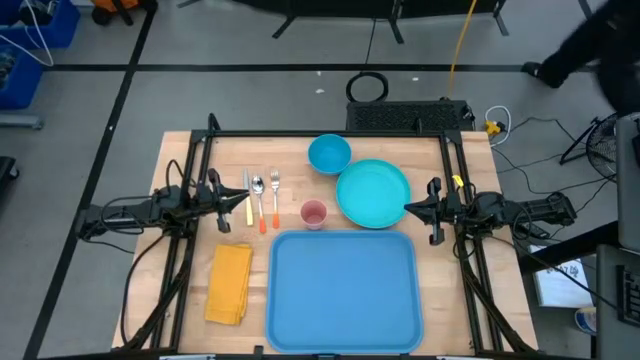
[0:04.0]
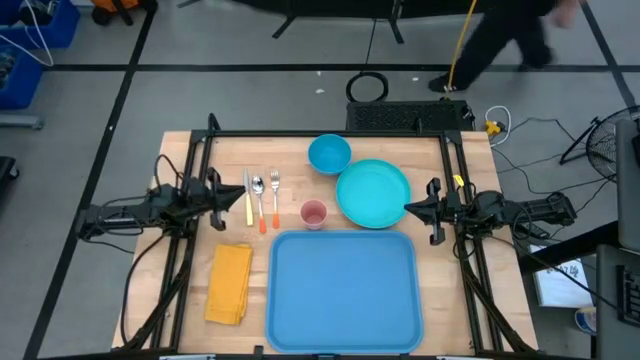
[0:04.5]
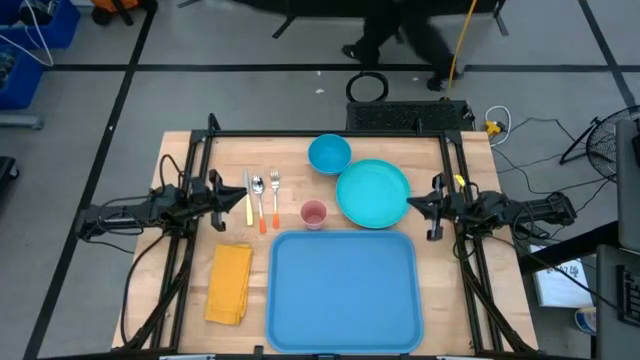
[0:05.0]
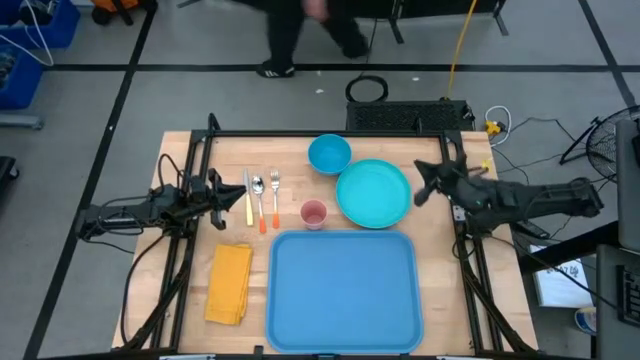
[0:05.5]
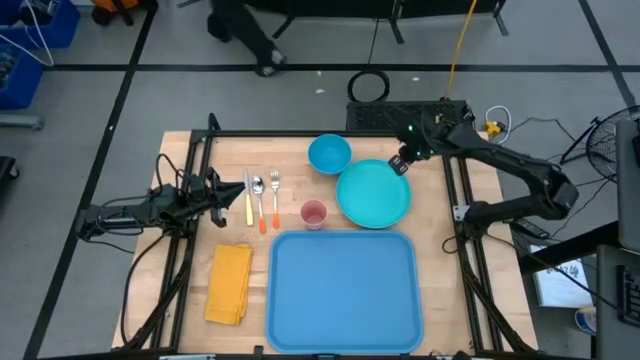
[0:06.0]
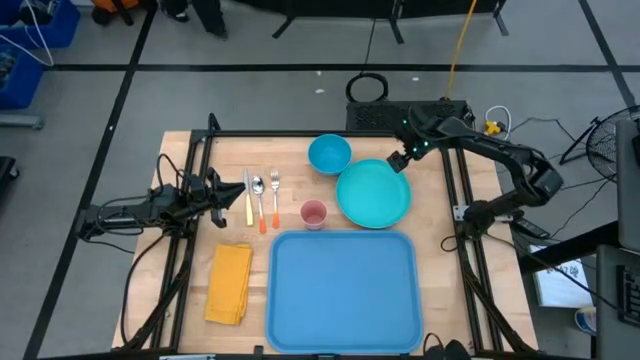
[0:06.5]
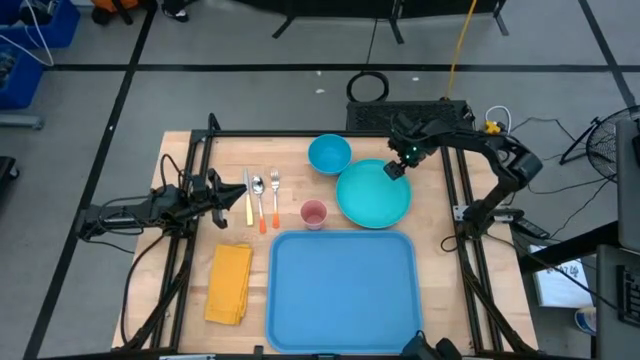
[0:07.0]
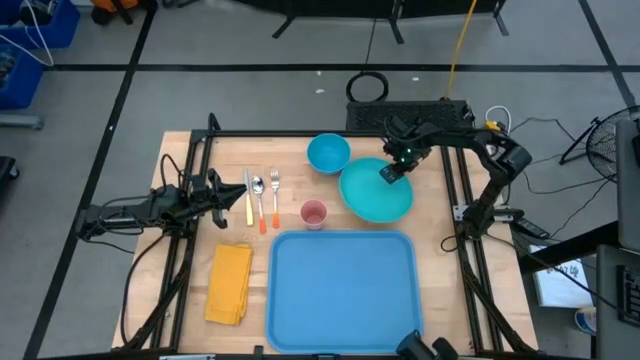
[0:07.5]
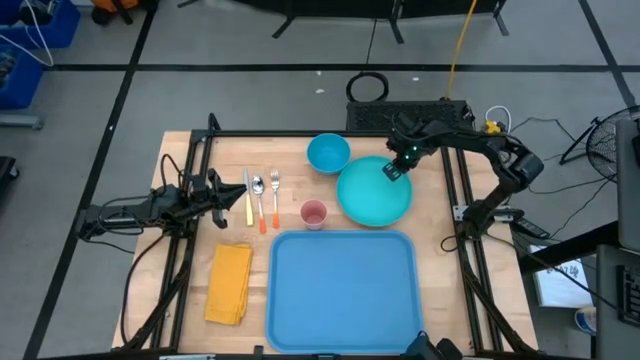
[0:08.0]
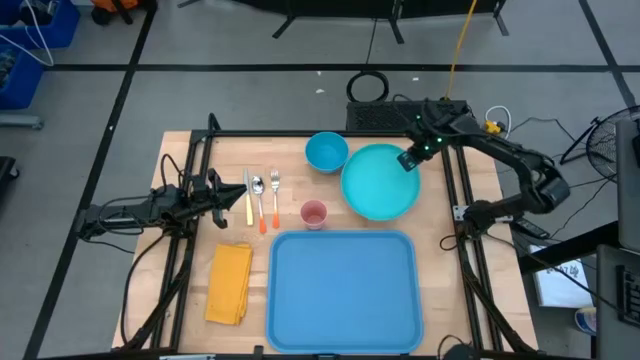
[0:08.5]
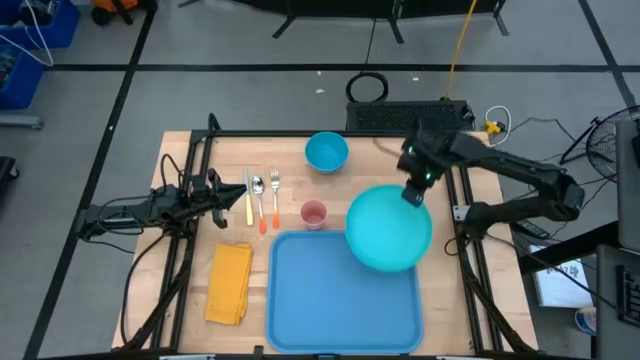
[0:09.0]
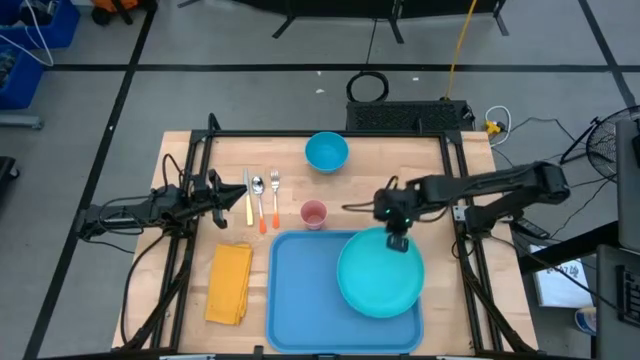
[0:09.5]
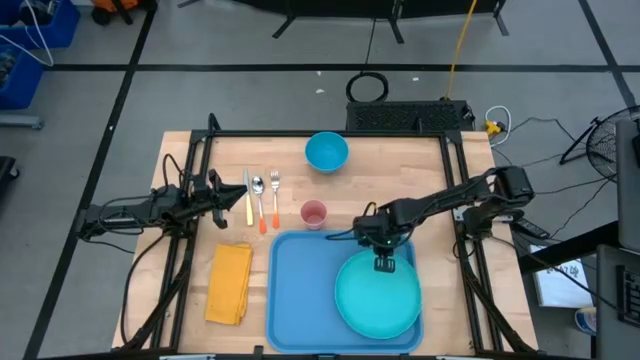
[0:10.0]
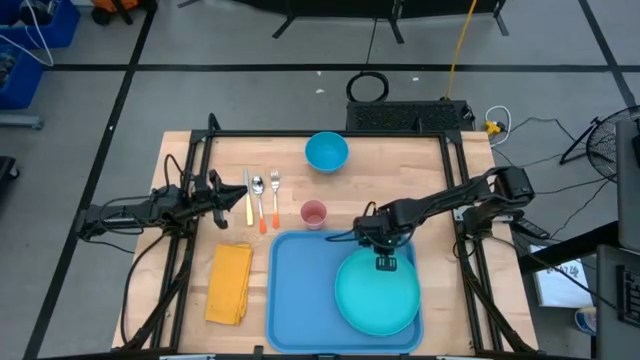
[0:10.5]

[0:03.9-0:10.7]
Task: Set up tray
Put the light blue plate on the right side of the blue tray

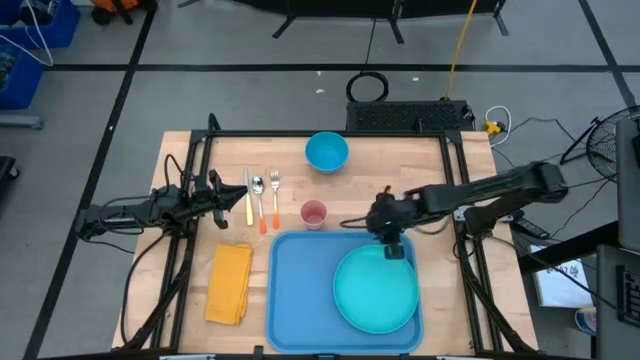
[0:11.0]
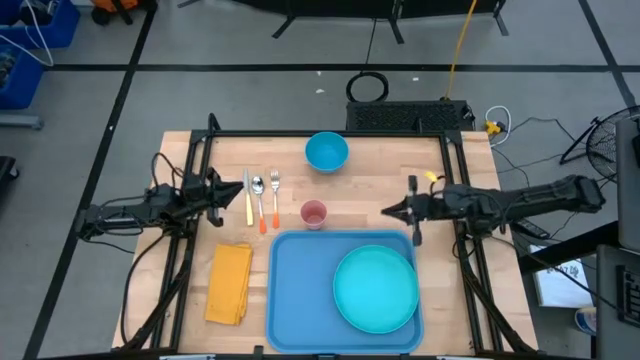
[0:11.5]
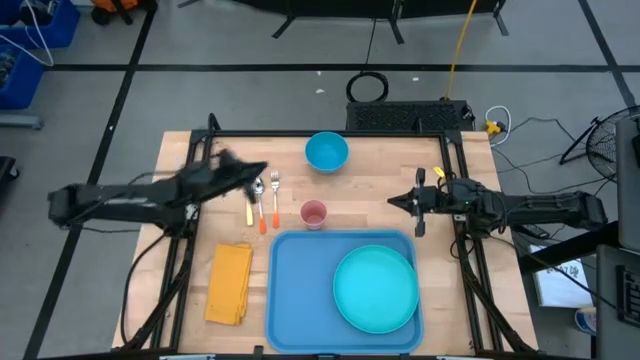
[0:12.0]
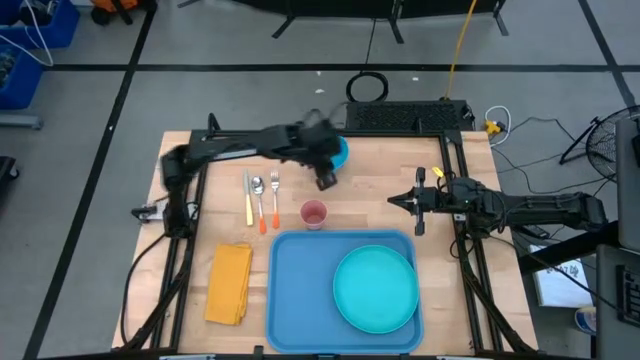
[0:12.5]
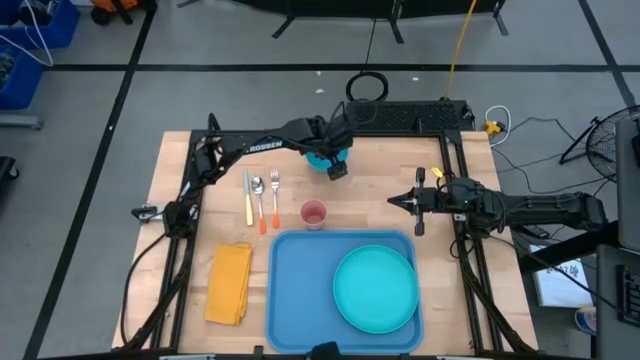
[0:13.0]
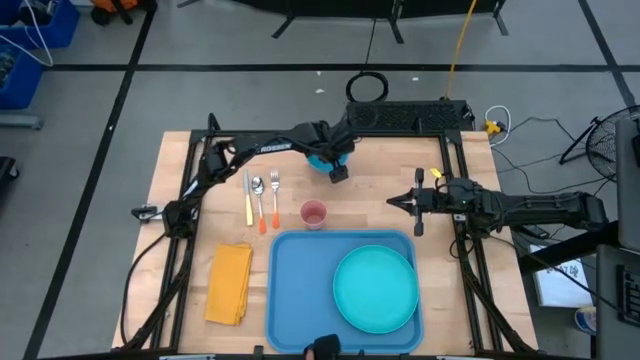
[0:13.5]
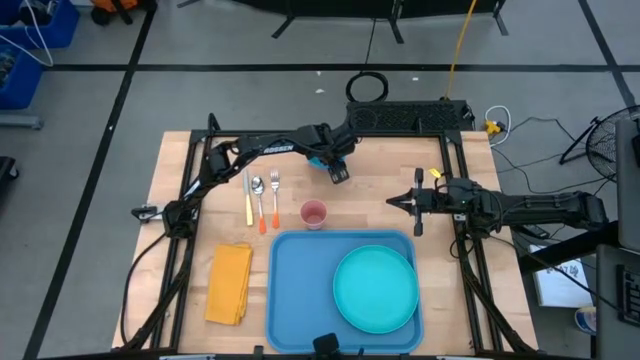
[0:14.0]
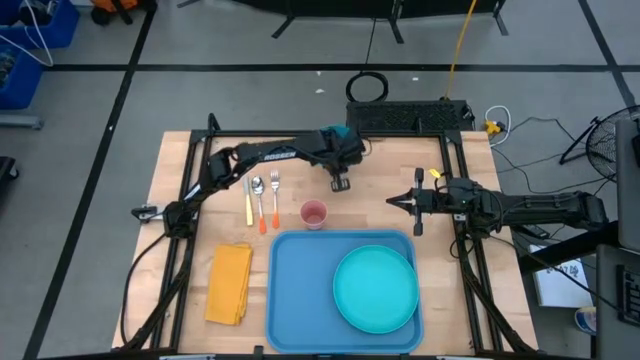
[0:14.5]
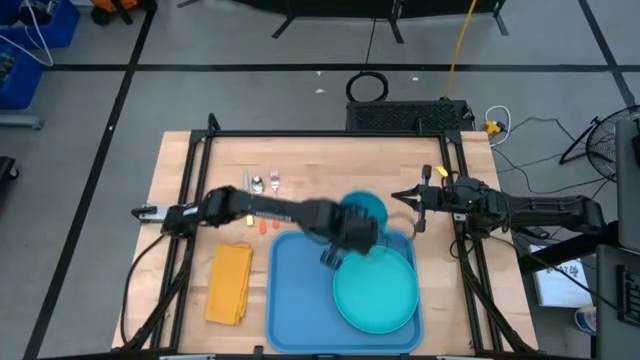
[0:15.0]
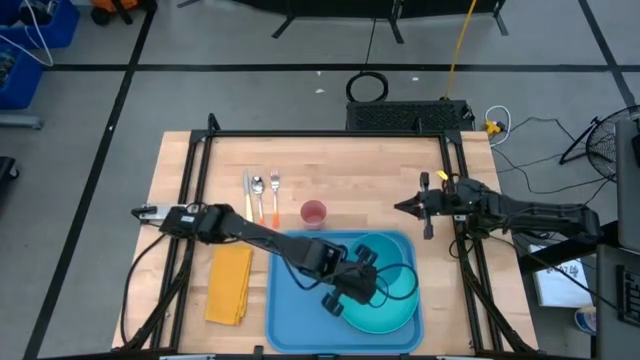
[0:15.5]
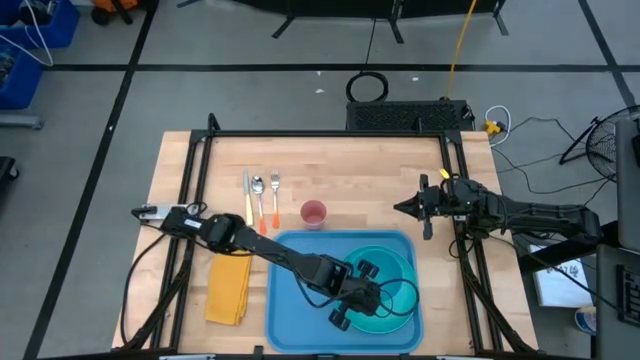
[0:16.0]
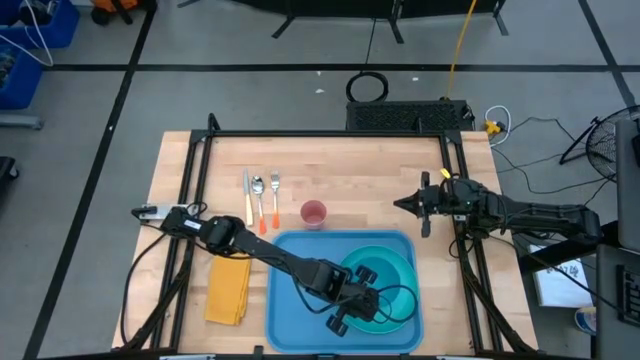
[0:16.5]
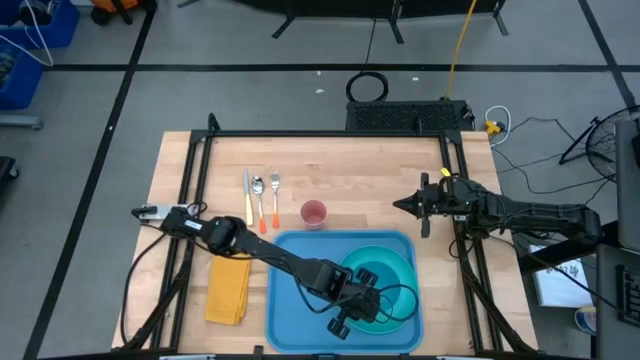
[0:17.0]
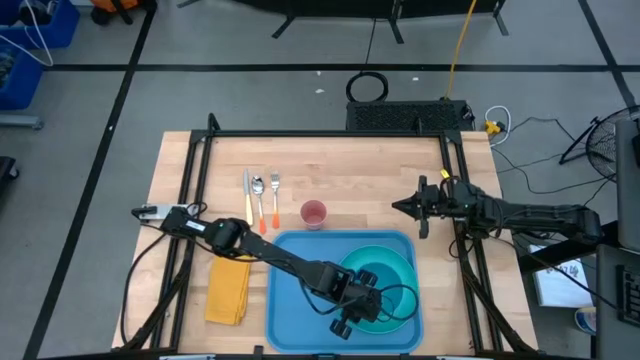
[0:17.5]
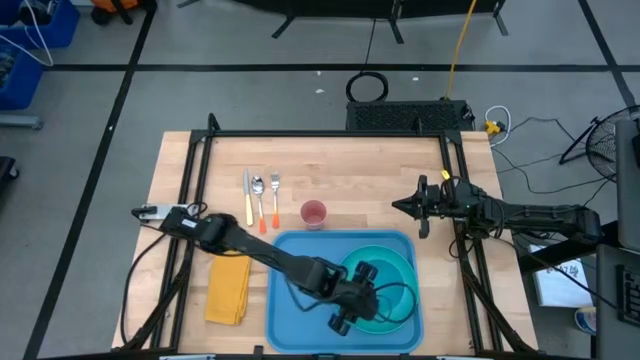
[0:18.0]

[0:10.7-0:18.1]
Put the blue bowl on the light blue plate on the blue tray

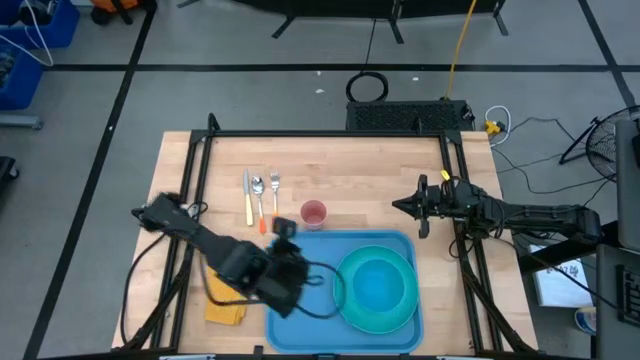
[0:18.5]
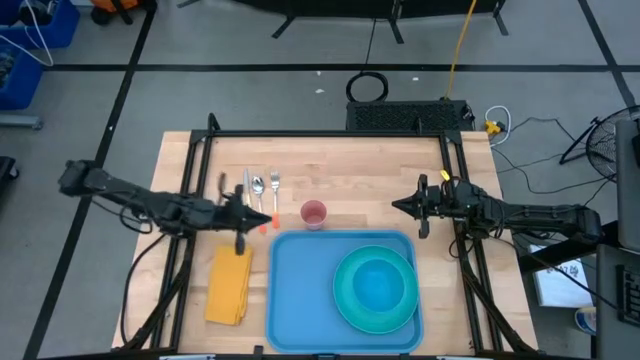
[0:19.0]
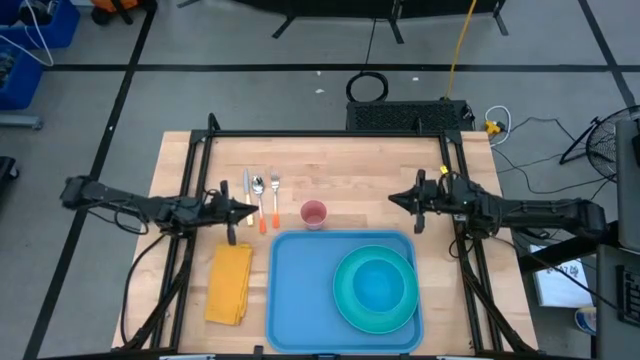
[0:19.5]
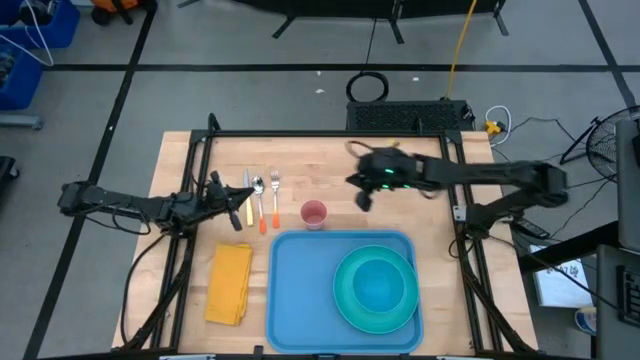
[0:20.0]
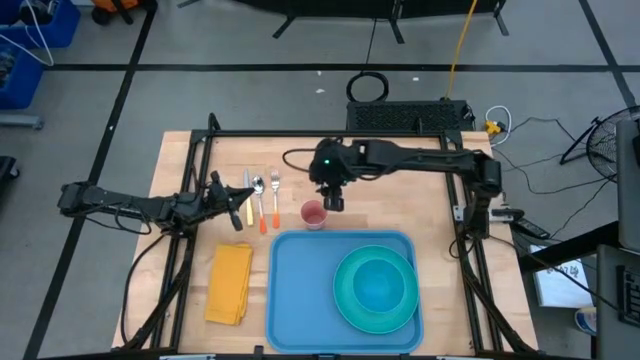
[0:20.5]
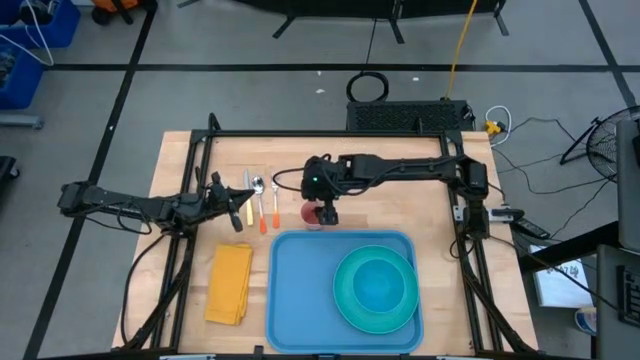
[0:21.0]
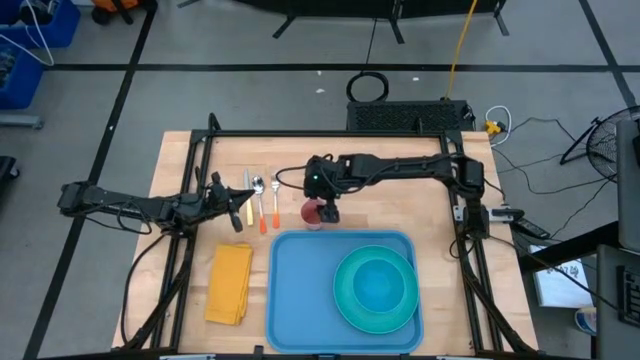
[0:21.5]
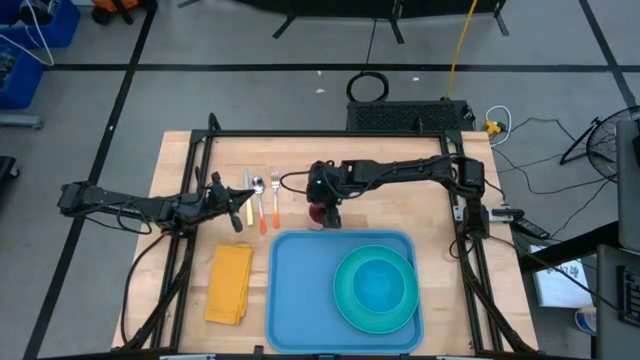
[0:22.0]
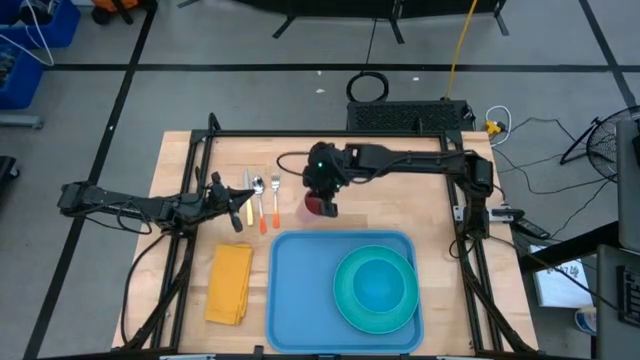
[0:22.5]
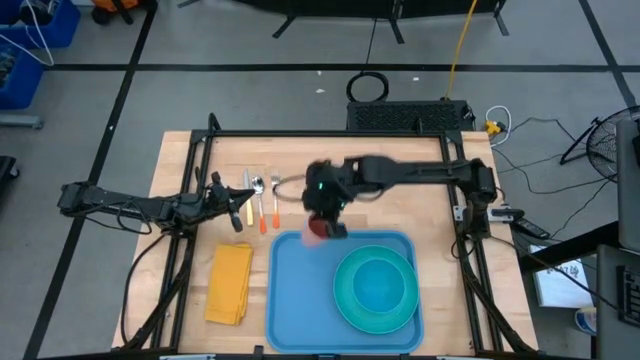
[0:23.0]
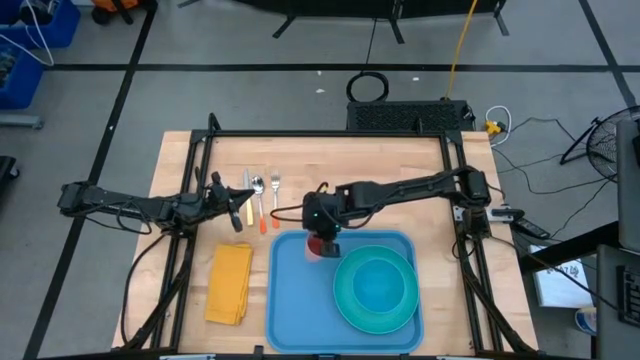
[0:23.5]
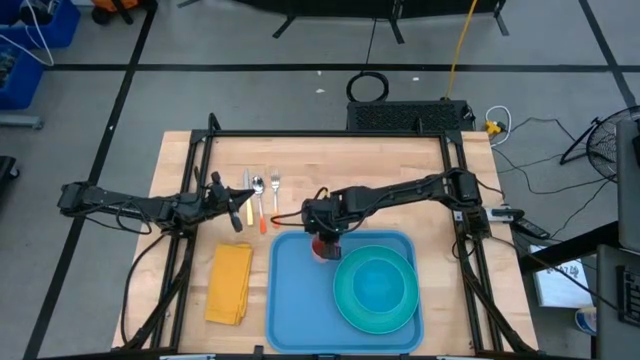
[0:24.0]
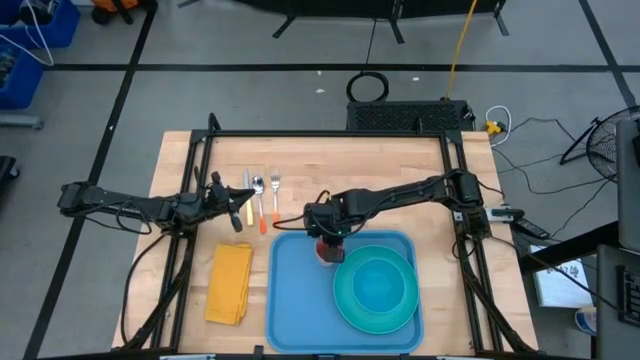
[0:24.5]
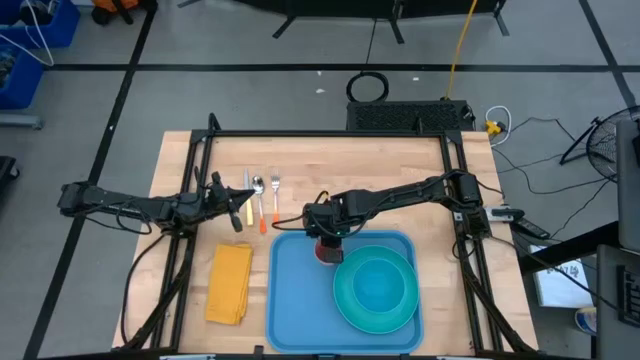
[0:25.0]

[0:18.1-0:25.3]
Put the red cup on the top left side of the light blue plate on the blue tray
